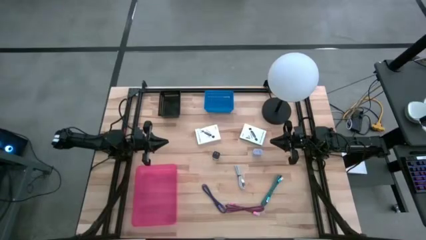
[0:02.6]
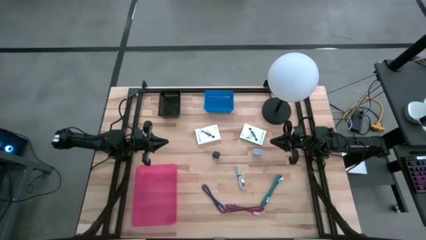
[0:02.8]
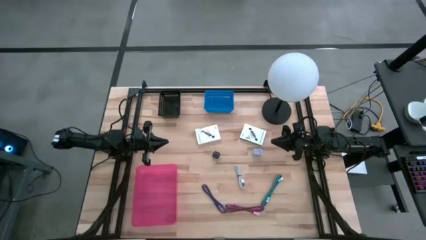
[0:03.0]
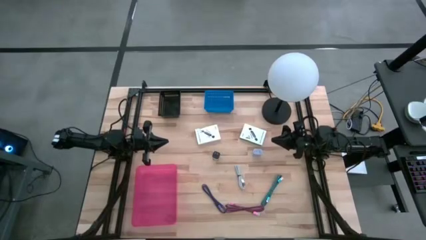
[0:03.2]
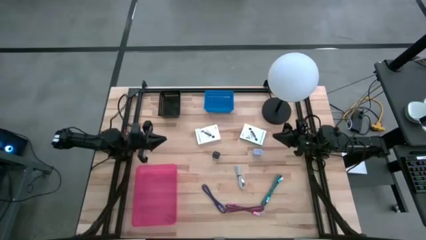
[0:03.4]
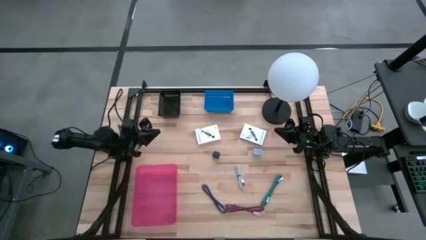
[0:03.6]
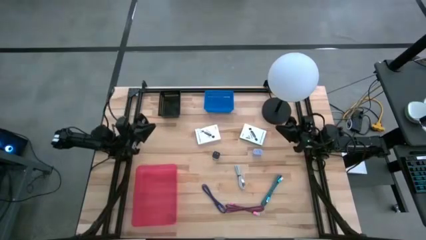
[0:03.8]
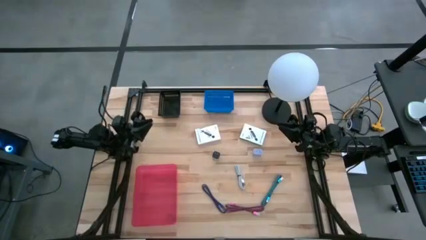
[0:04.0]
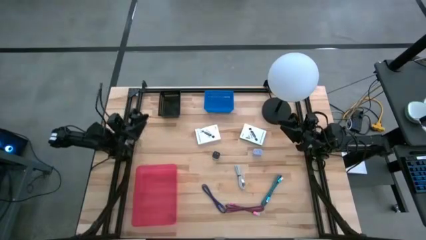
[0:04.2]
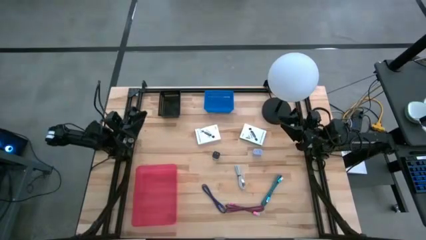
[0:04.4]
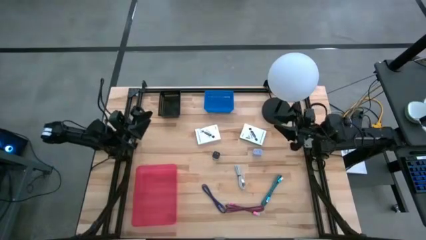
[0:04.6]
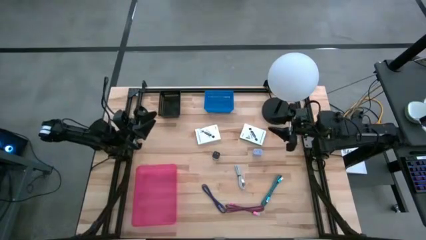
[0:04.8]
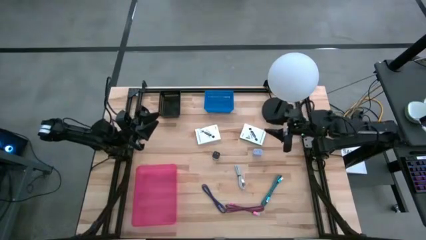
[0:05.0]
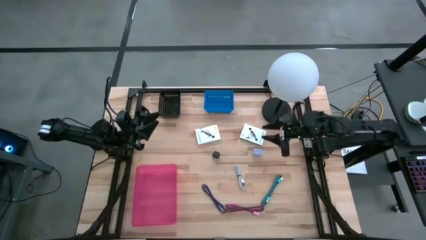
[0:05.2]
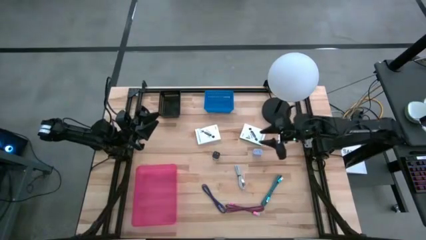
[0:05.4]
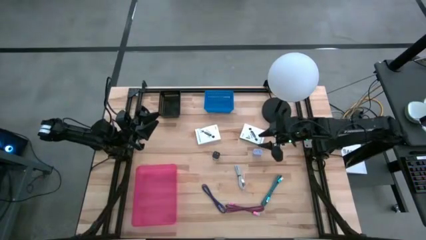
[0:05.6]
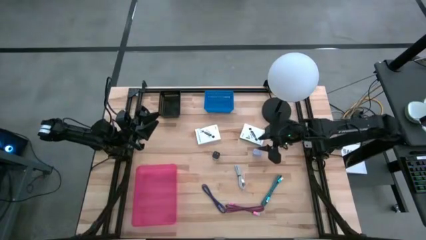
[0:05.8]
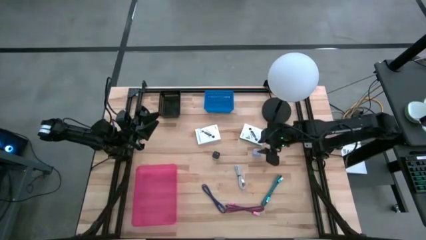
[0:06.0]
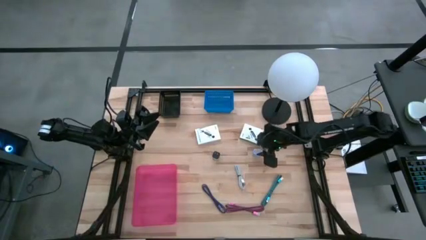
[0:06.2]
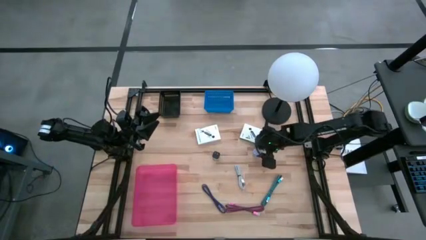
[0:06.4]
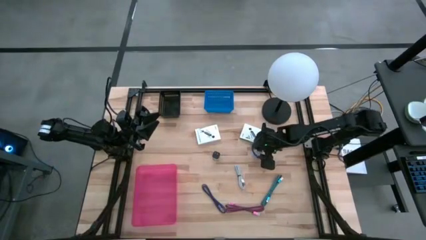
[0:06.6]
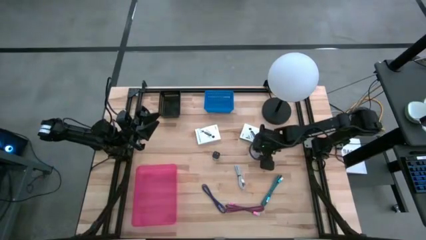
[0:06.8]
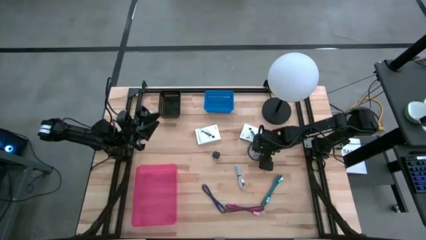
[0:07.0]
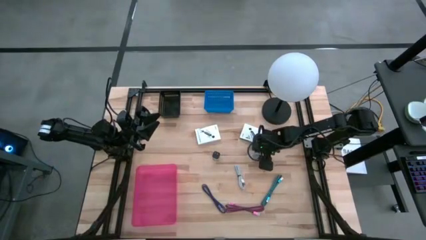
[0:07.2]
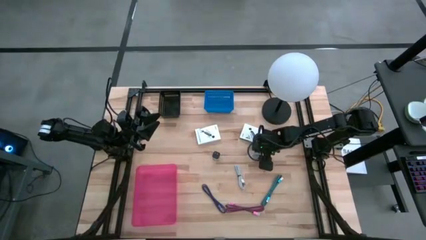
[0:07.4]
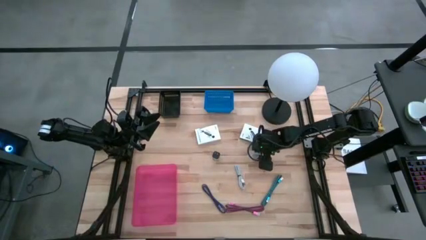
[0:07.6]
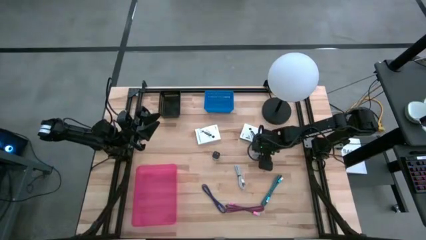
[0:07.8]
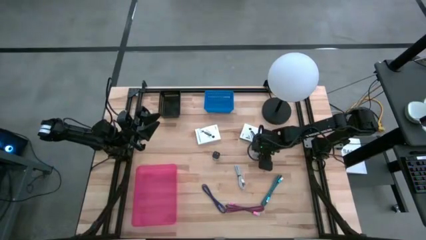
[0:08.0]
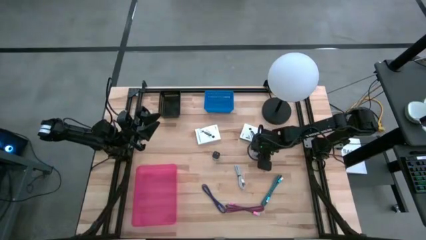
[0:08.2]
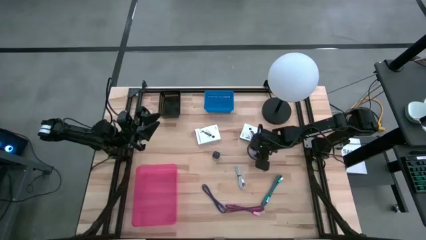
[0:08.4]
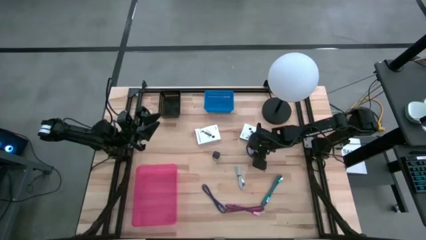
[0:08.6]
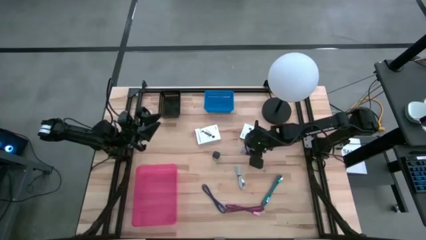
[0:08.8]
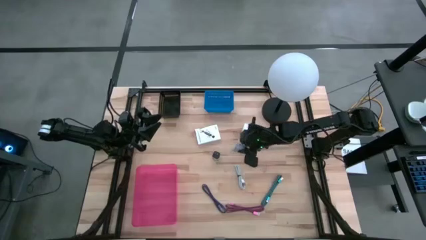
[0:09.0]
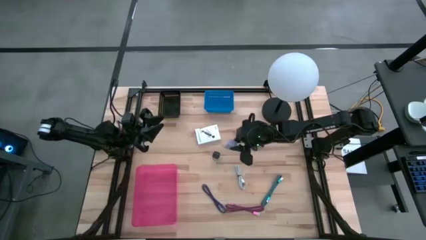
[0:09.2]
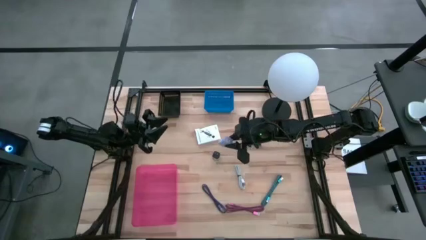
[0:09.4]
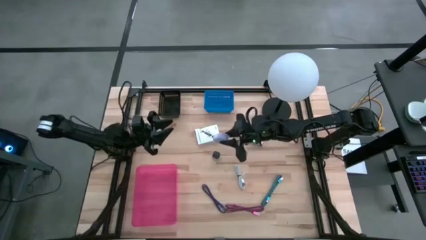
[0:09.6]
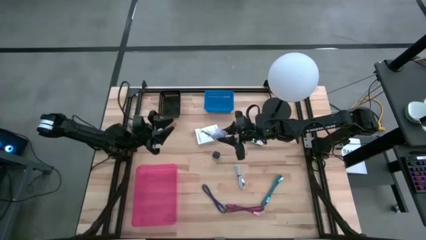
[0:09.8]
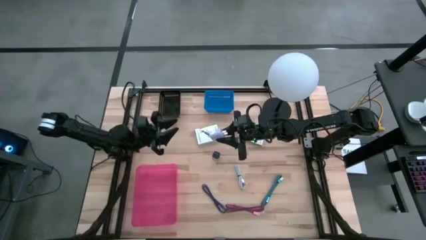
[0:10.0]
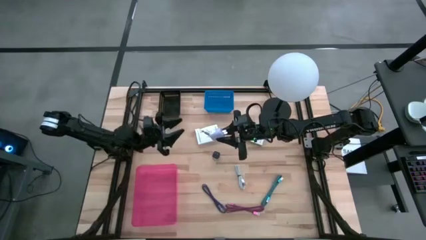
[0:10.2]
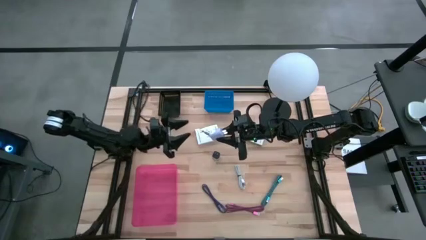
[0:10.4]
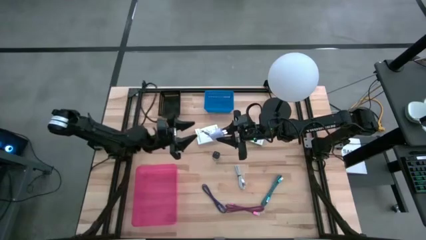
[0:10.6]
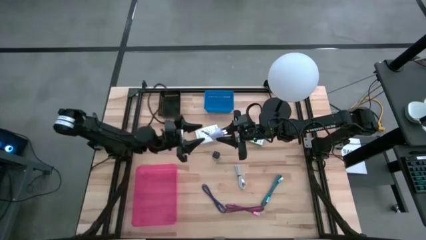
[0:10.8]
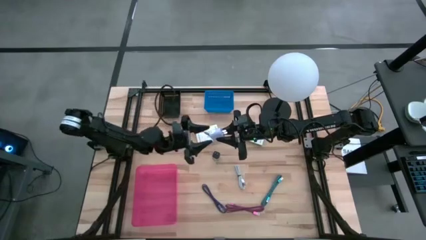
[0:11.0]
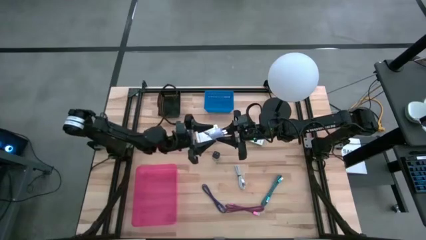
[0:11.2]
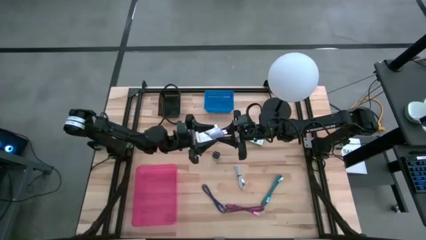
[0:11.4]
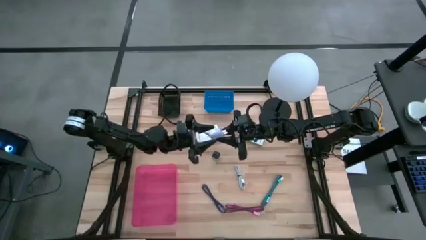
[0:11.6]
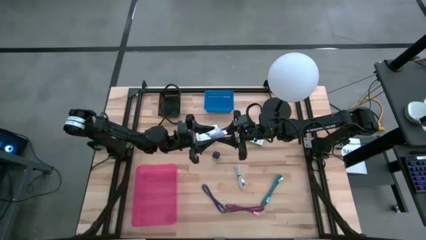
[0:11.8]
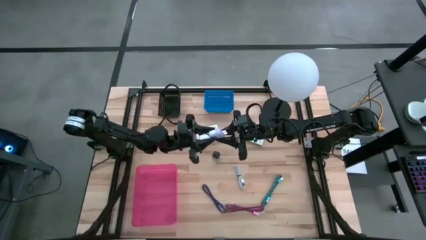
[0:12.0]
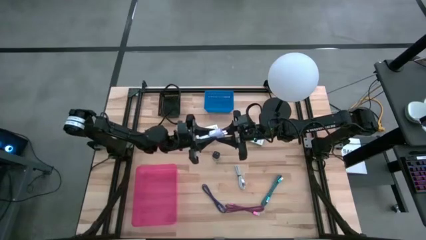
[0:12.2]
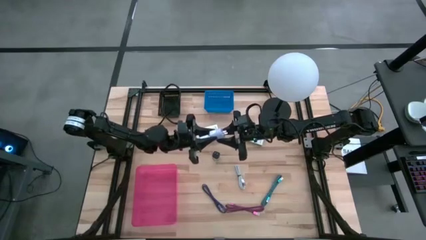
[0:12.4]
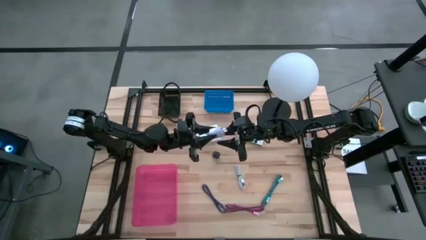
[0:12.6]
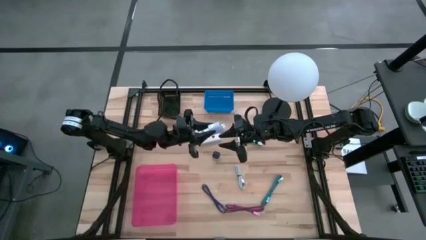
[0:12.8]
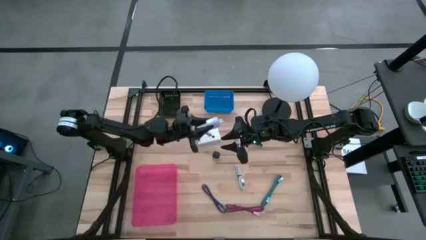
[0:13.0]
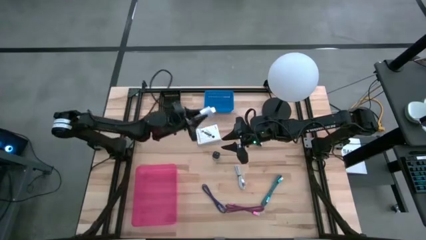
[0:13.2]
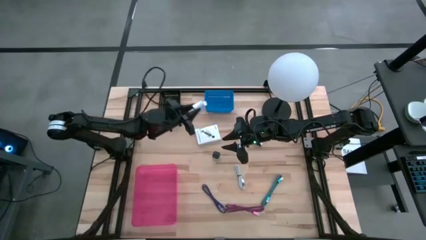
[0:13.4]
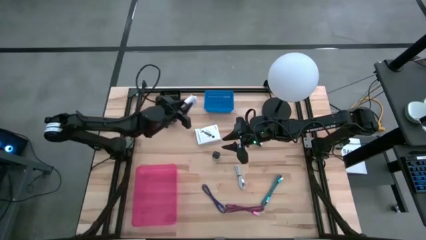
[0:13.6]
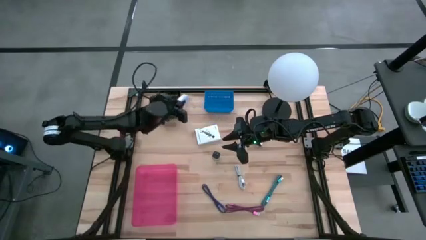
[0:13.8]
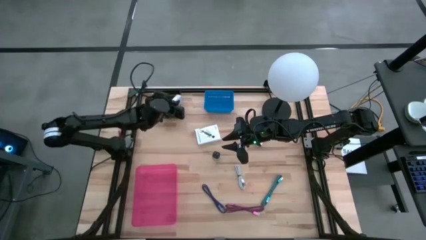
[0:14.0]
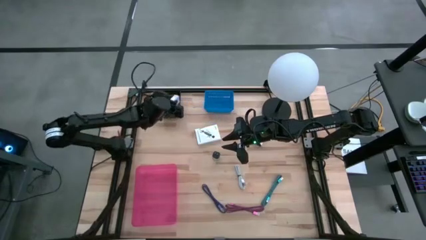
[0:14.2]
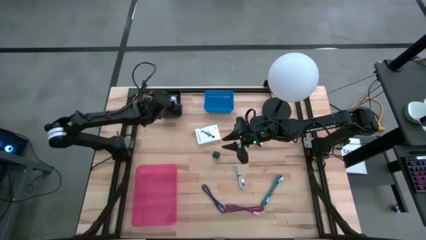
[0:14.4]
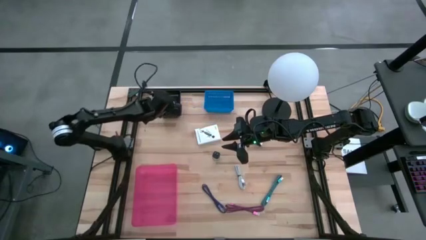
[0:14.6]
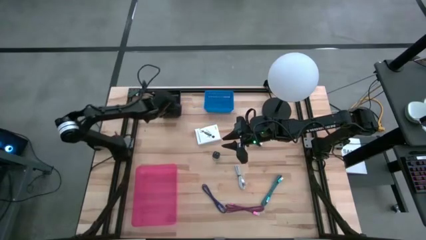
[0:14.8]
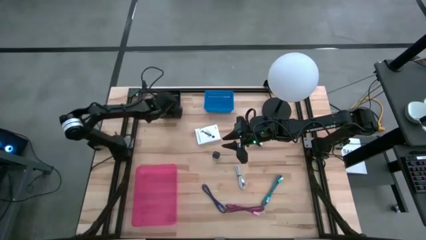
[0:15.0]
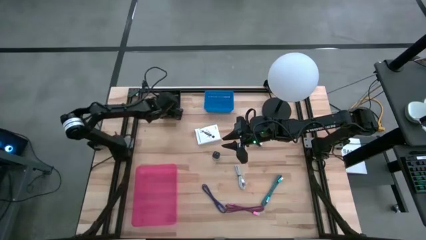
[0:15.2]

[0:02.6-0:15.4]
Task: Pick and place items into bin
Put the white charger adapter into the black bin

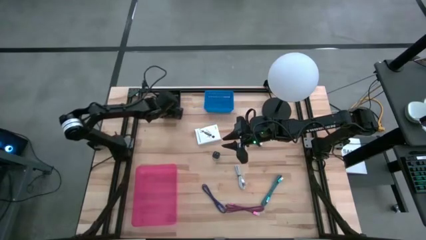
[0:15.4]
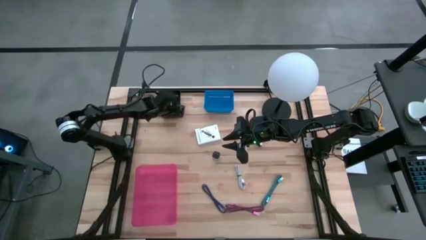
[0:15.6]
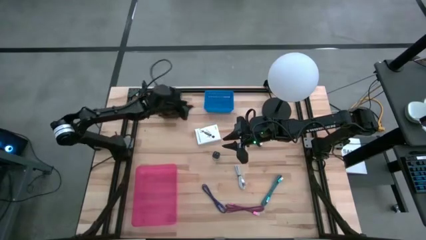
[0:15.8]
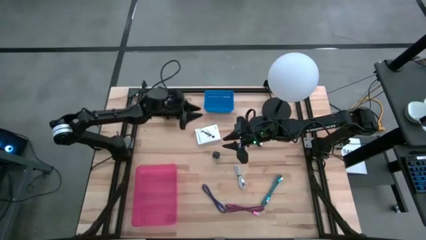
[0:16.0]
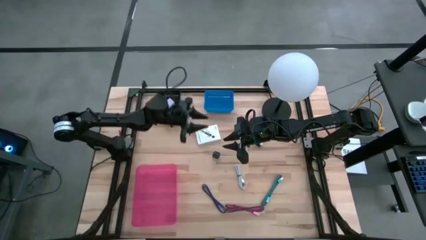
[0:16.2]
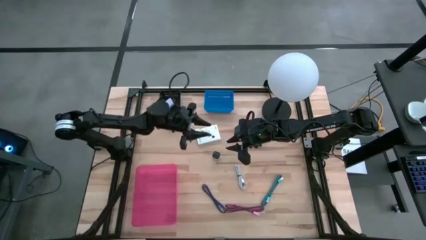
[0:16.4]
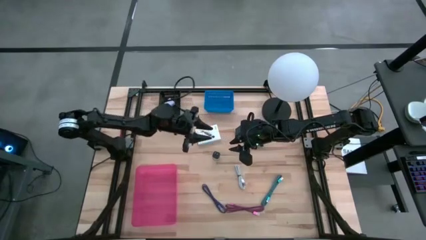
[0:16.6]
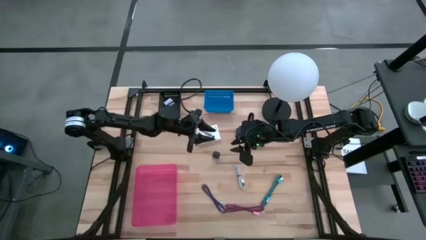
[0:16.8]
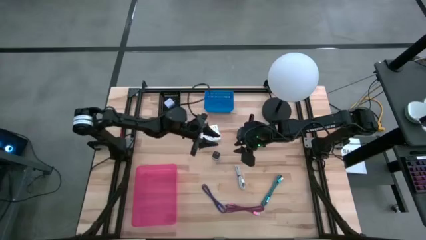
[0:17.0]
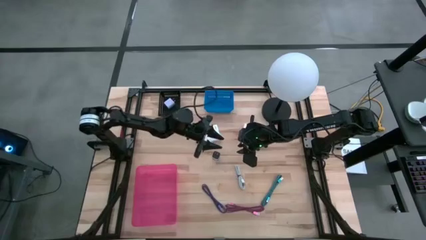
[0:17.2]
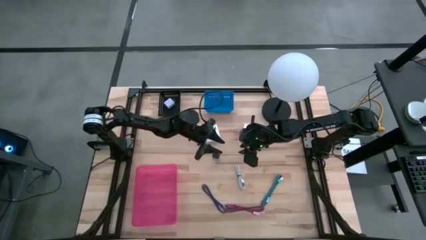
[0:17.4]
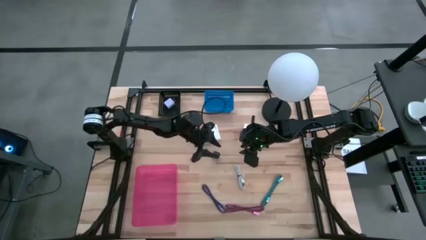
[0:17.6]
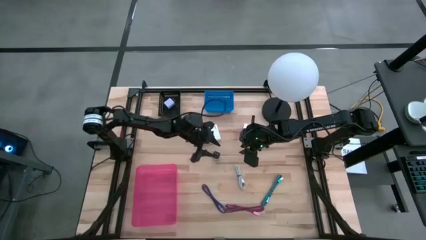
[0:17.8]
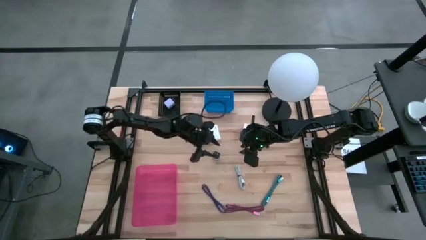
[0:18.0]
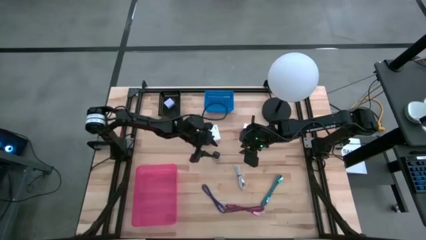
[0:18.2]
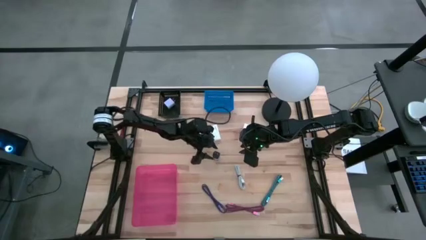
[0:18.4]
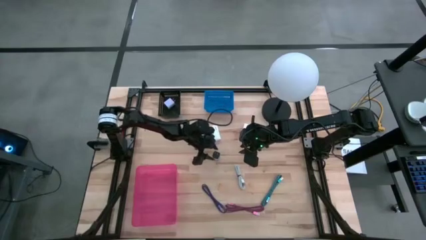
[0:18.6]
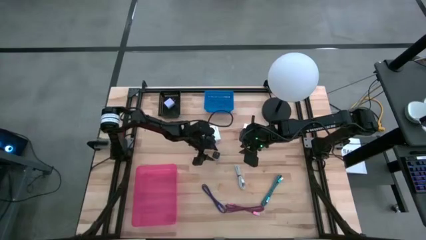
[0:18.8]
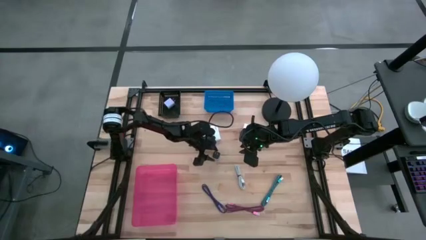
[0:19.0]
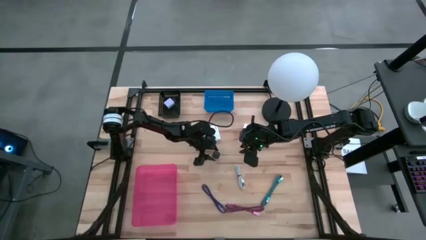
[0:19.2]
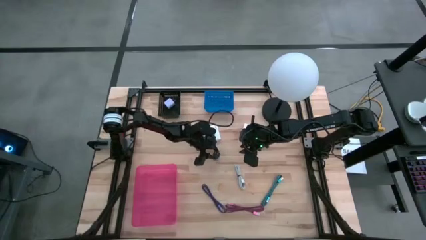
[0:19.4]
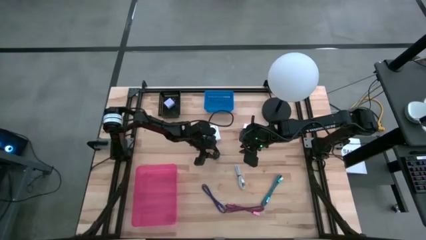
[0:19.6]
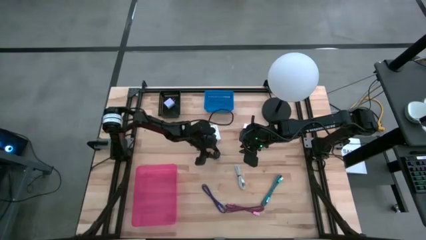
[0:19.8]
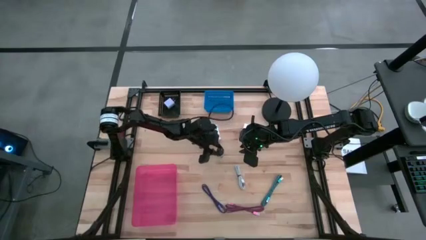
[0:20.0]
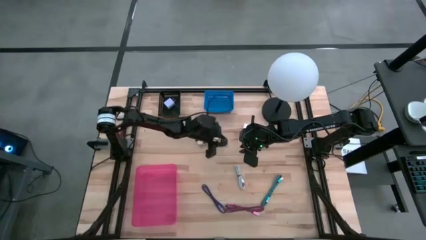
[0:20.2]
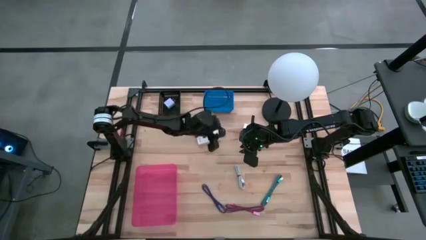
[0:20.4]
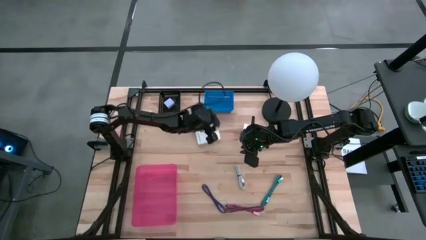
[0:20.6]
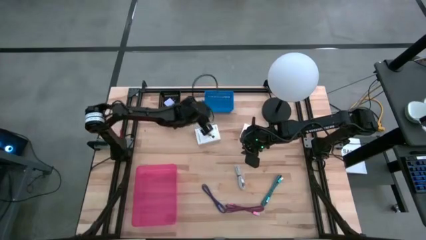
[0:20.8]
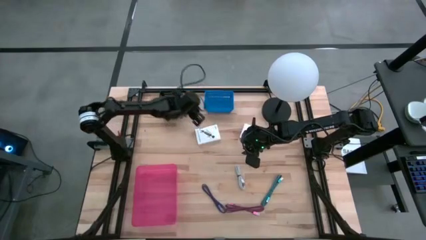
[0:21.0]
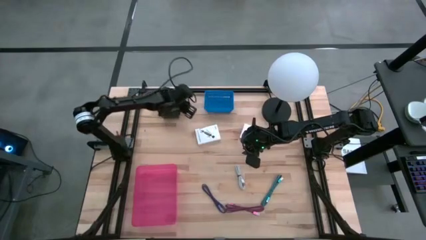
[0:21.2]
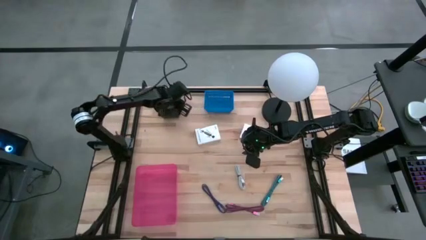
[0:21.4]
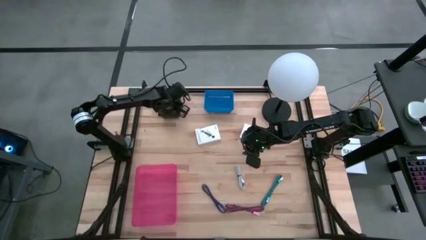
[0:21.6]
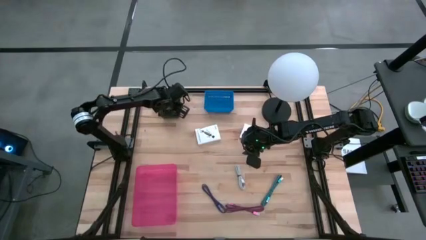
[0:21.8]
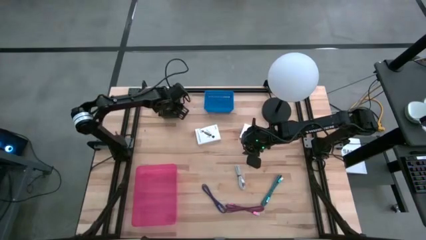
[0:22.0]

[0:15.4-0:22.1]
Put the black charger adapter into the black bin
